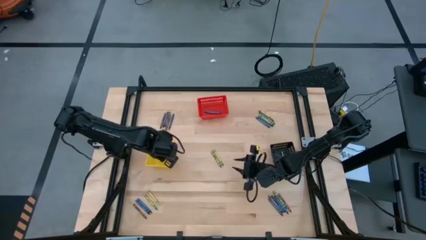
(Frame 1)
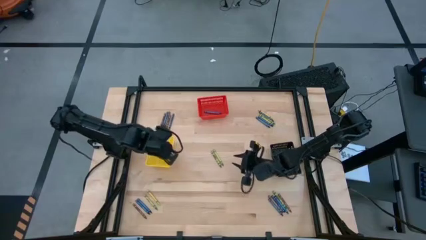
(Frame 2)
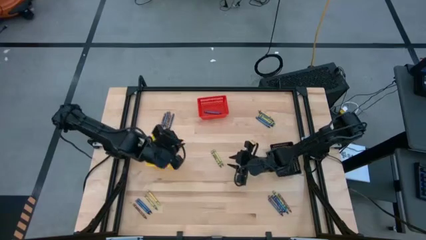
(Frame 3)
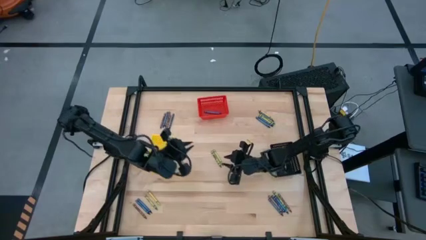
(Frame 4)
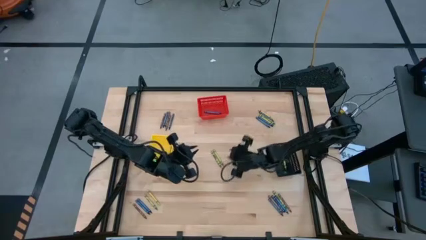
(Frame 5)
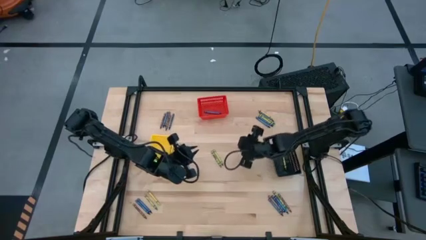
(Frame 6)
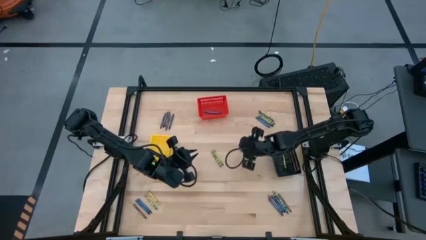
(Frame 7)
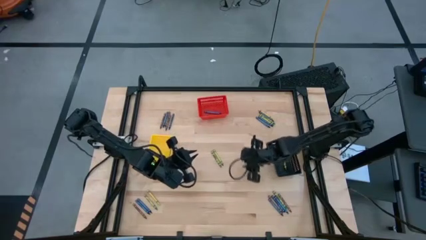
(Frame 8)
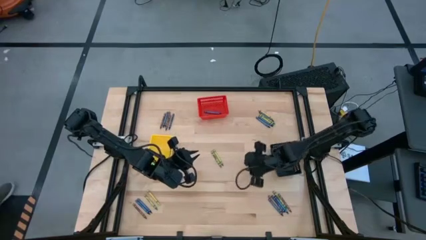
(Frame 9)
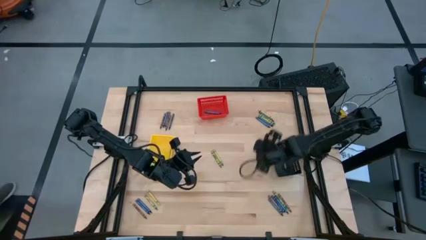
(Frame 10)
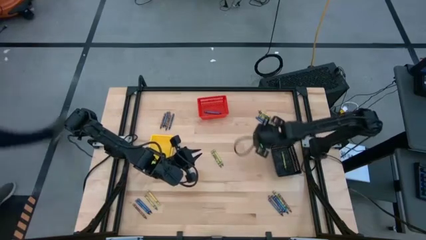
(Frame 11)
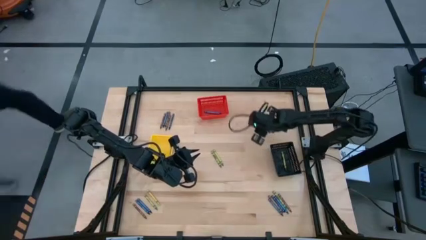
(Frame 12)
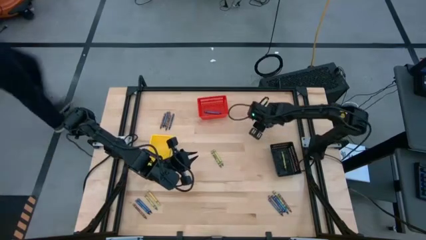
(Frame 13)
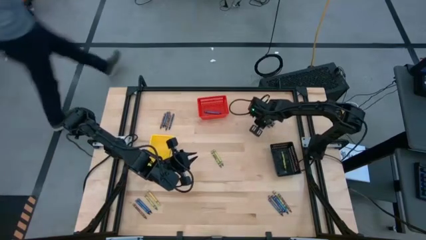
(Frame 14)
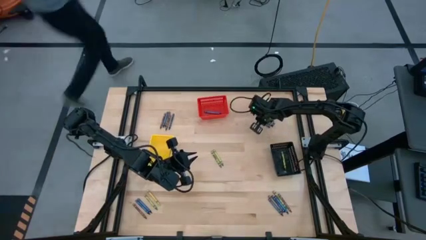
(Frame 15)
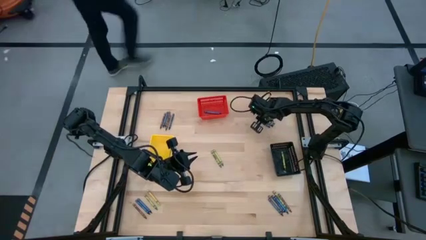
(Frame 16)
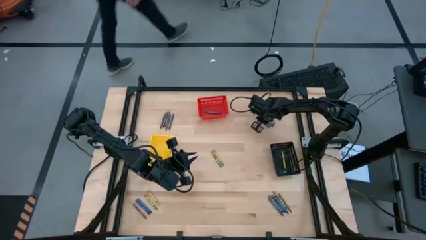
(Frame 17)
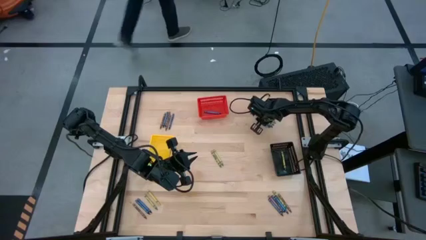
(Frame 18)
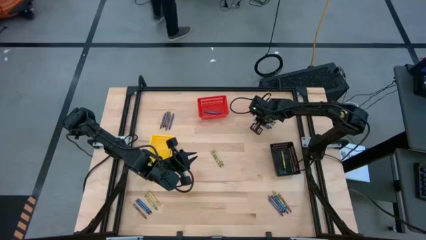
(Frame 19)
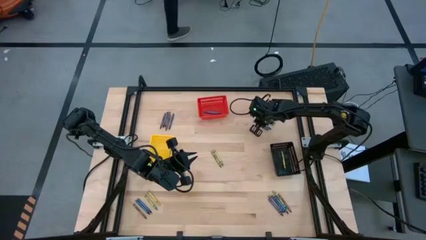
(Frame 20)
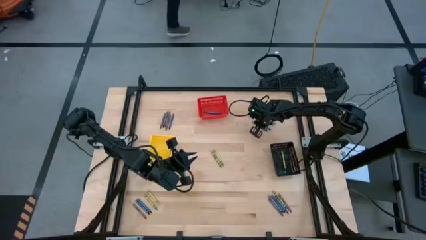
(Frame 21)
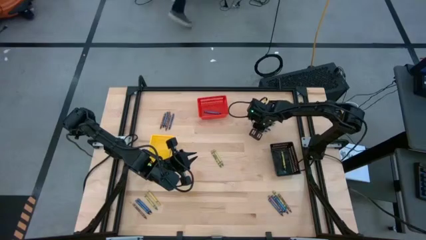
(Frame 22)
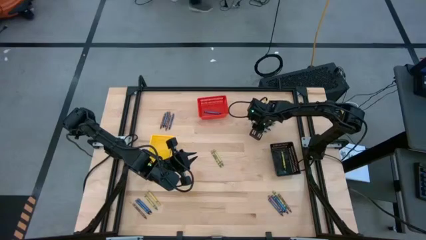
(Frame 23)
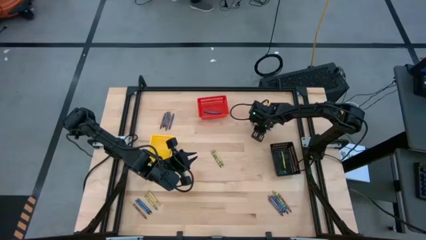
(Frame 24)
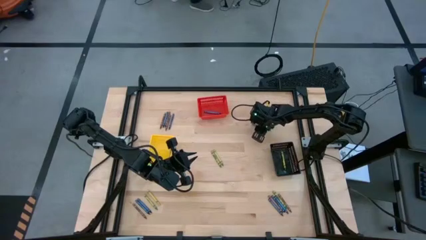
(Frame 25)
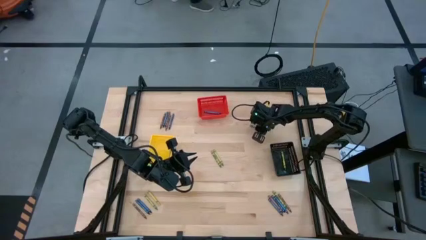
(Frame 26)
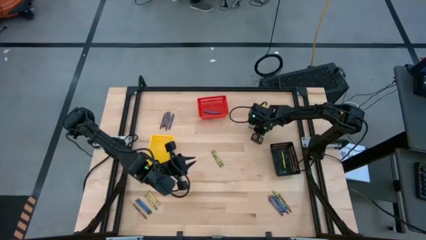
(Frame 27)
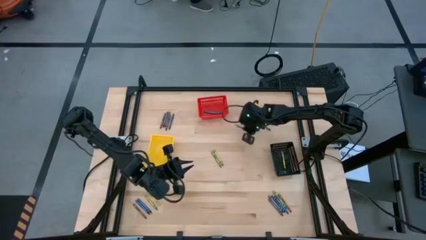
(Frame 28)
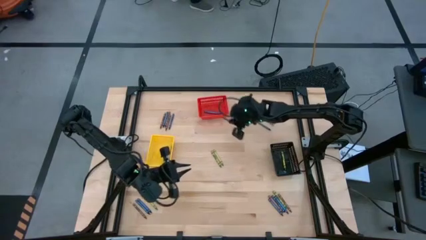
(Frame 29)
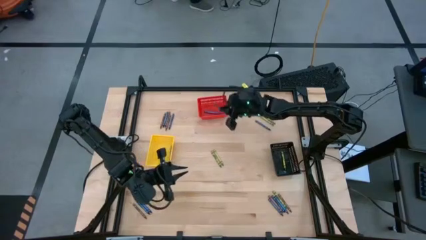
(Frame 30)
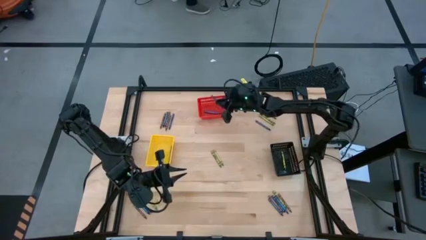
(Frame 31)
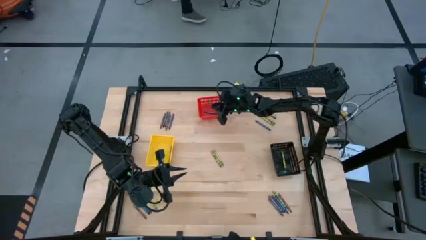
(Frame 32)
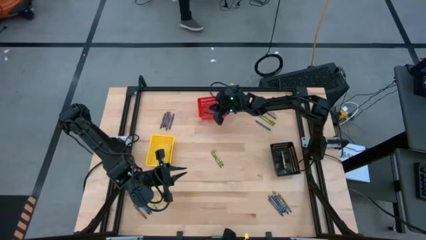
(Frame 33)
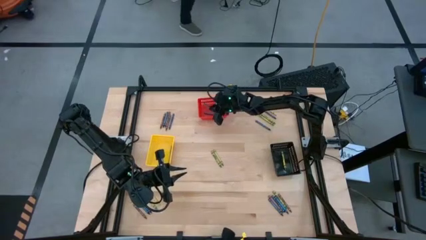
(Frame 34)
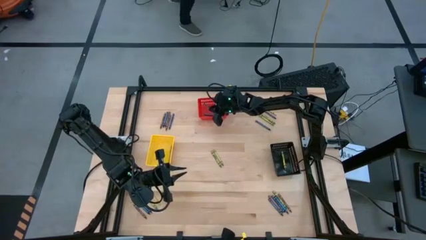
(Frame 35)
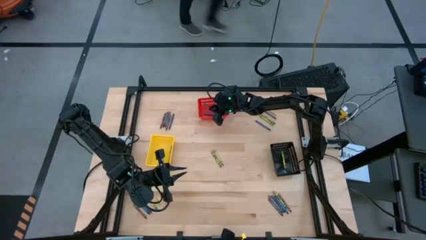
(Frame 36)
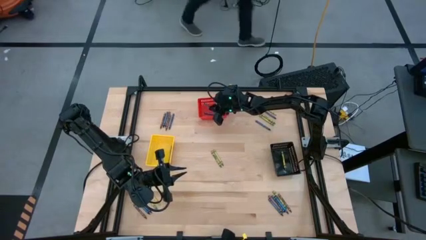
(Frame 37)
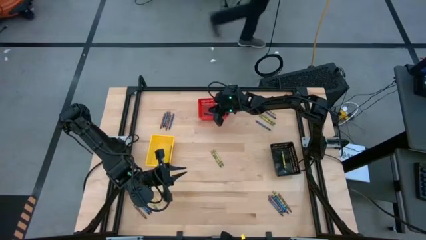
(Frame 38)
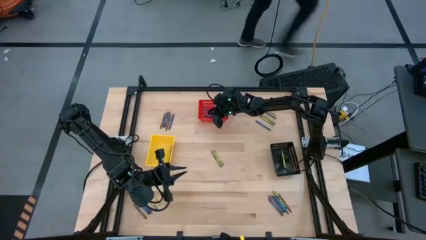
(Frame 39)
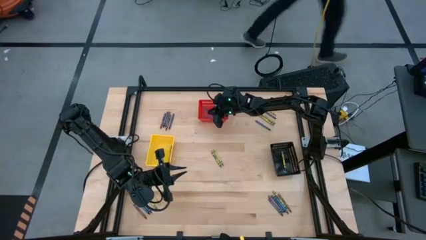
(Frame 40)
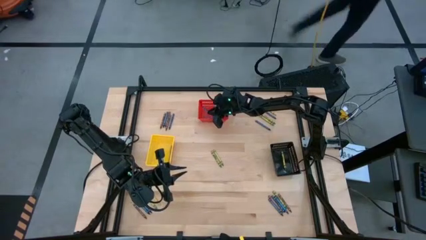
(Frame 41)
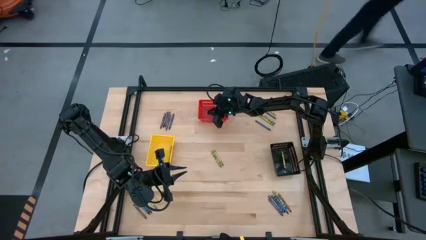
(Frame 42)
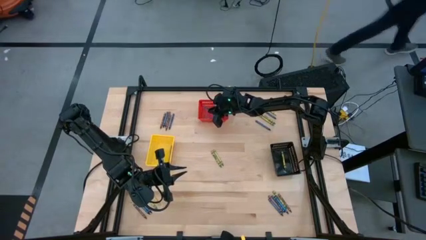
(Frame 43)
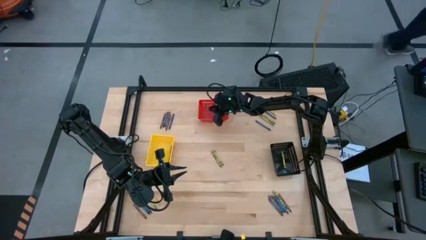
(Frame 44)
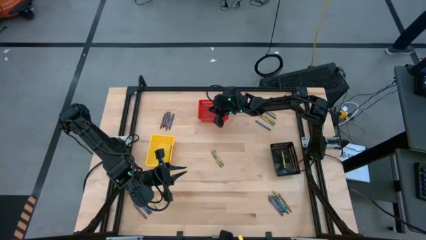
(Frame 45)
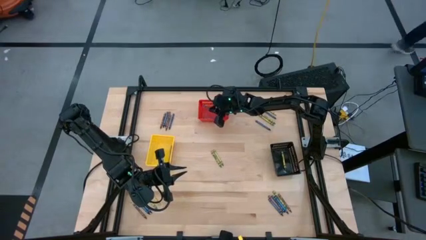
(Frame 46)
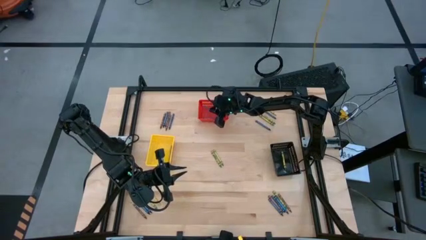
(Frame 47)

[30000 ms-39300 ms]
Task: Sort crayons
Put the blue crayon into the red basket

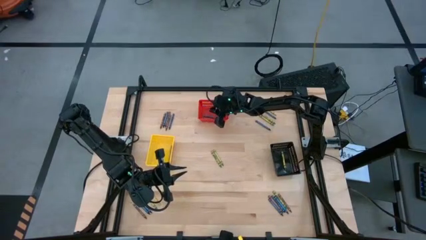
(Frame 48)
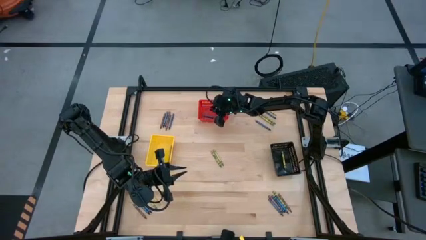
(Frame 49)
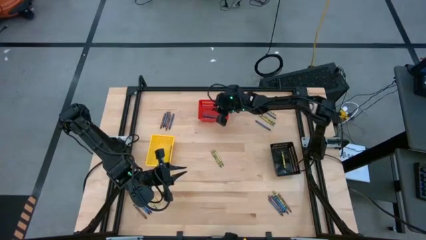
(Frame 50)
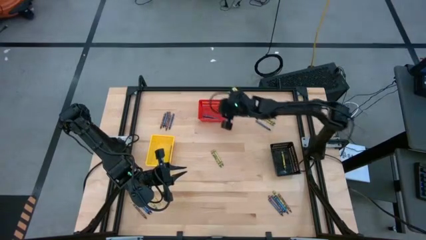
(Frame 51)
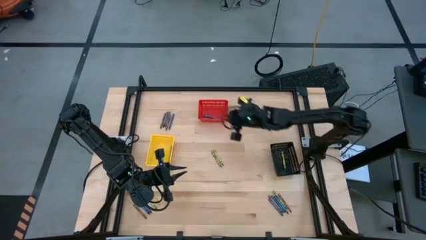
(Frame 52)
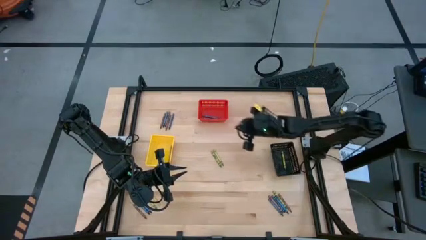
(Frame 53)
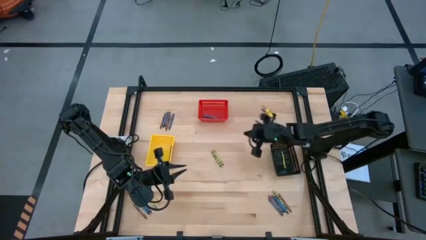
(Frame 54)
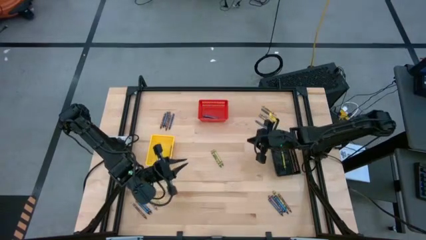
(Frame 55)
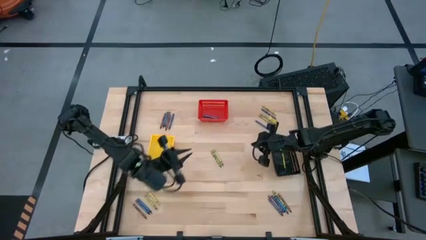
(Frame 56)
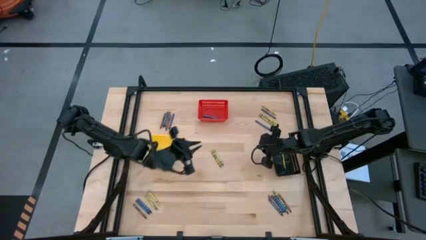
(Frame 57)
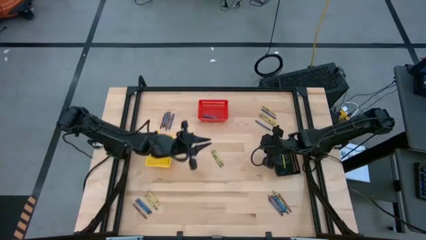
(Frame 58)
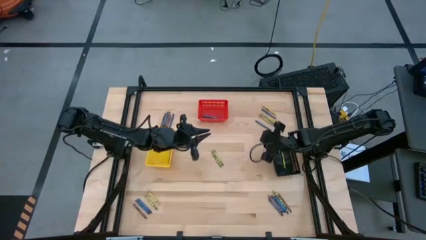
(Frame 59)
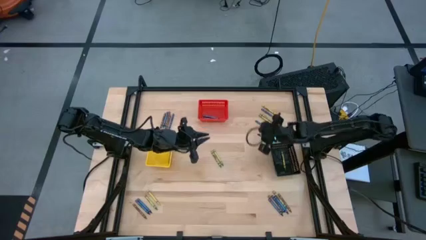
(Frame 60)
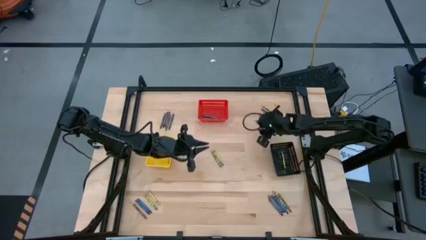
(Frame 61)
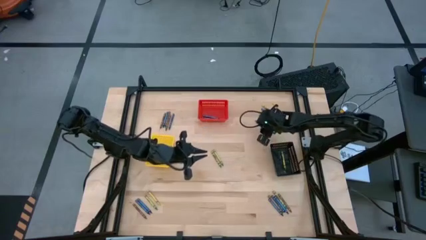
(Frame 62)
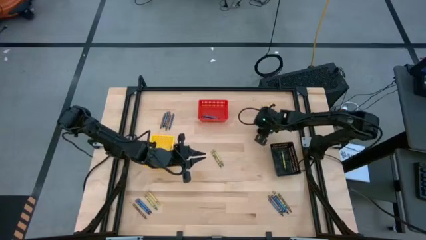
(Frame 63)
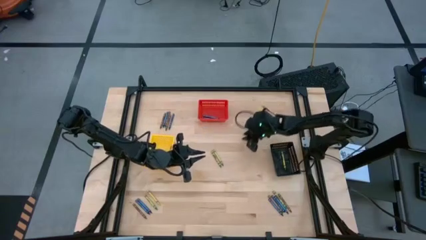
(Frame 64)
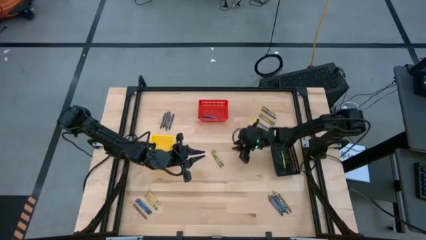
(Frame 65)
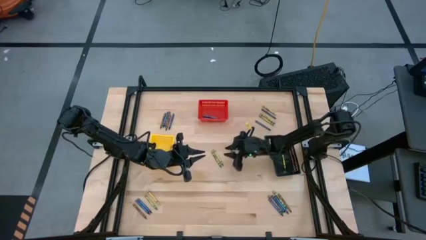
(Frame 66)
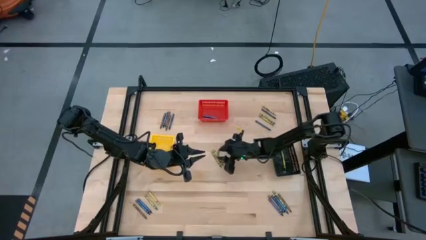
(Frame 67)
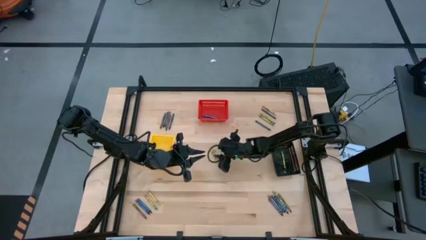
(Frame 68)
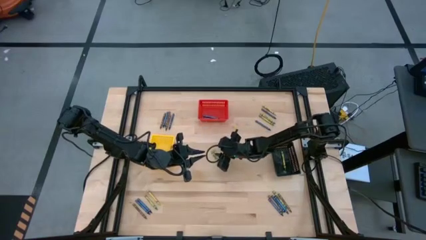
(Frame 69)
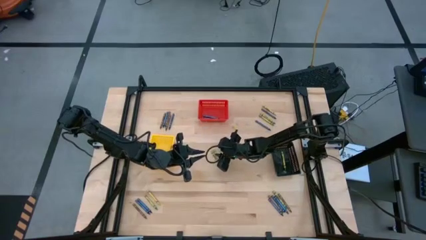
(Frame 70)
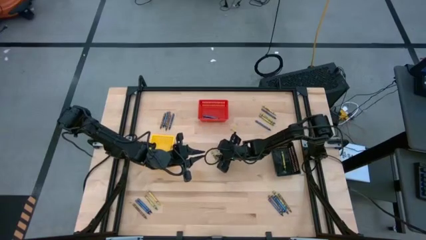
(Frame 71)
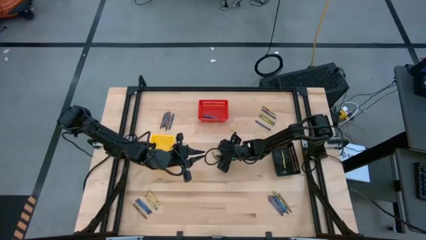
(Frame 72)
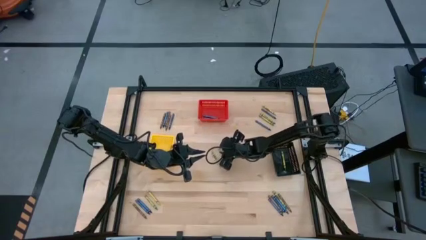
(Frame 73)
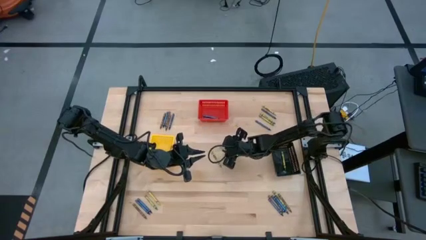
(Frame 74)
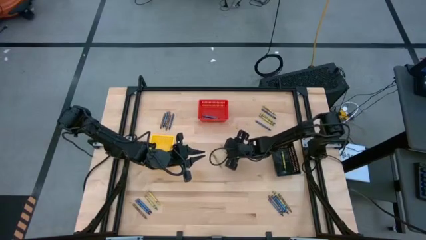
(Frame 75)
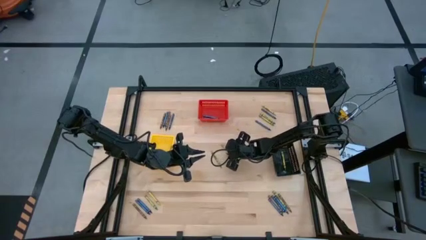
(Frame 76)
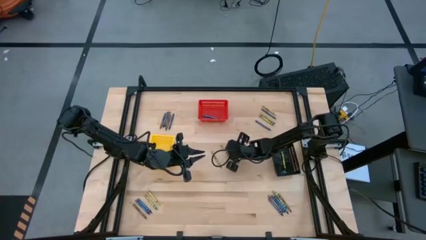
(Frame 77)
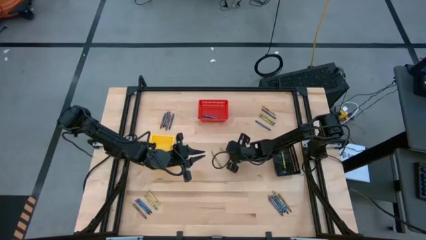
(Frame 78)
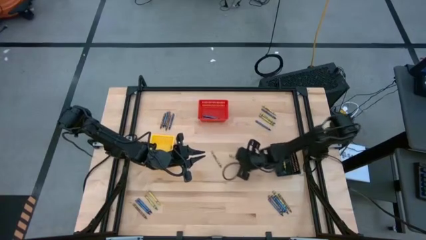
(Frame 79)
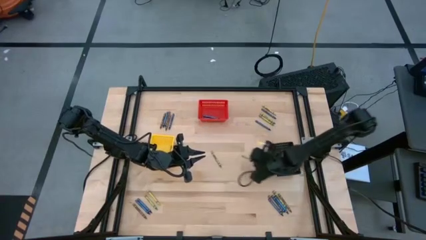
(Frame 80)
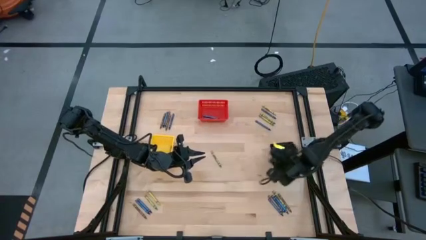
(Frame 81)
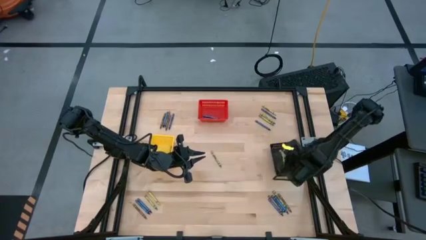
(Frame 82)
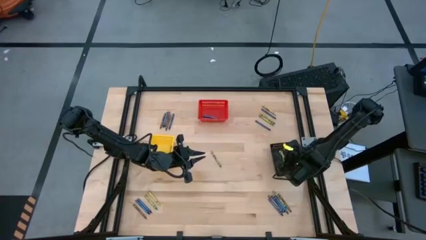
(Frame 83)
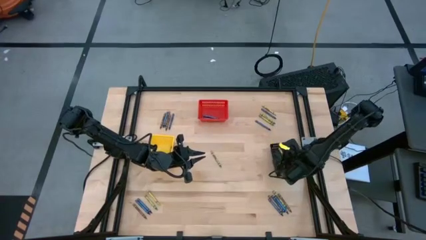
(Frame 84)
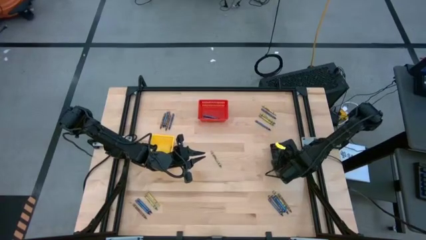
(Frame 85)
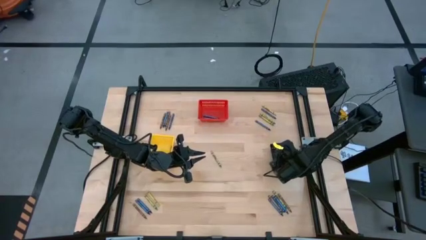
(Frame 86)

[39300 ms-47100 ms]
Put the green crayon into the black basket
